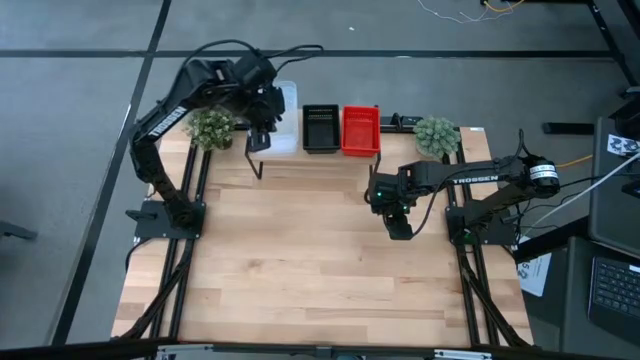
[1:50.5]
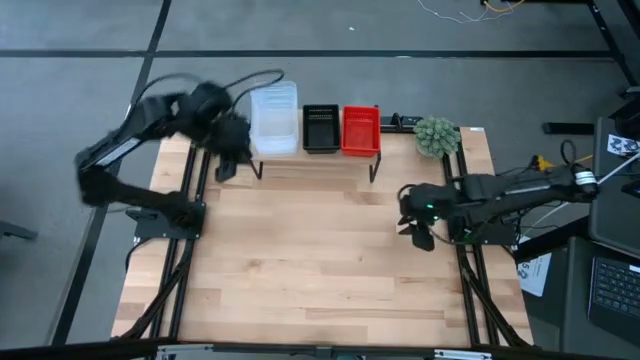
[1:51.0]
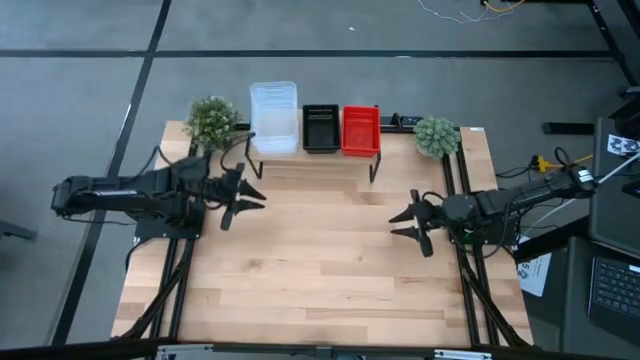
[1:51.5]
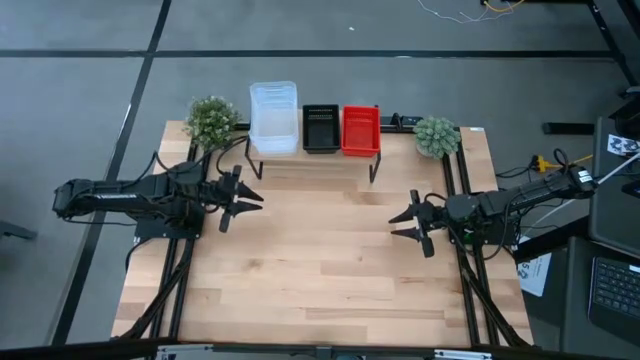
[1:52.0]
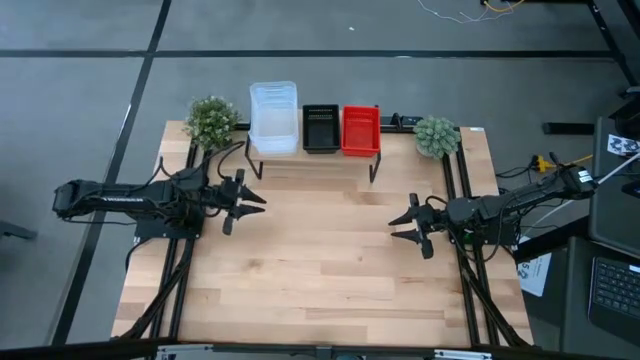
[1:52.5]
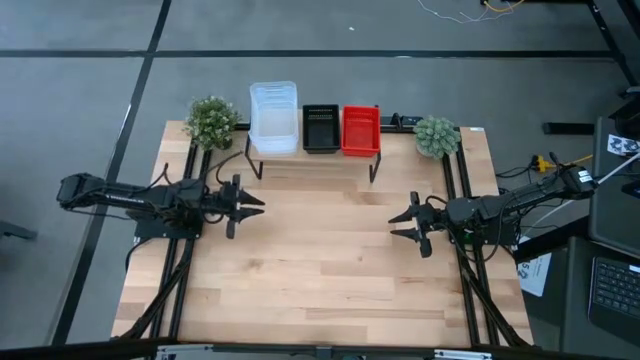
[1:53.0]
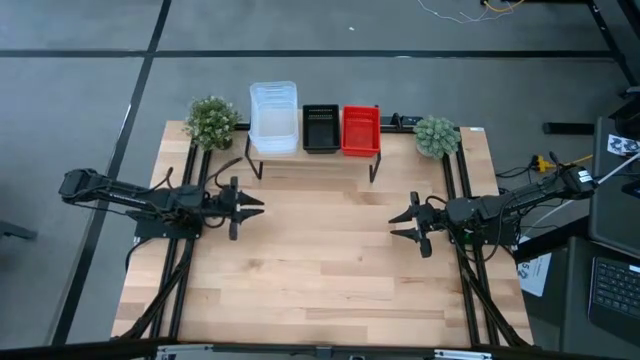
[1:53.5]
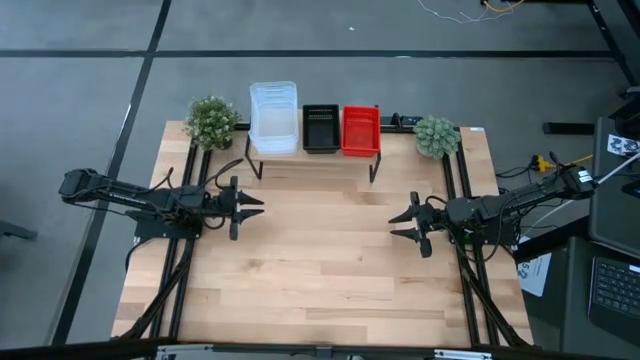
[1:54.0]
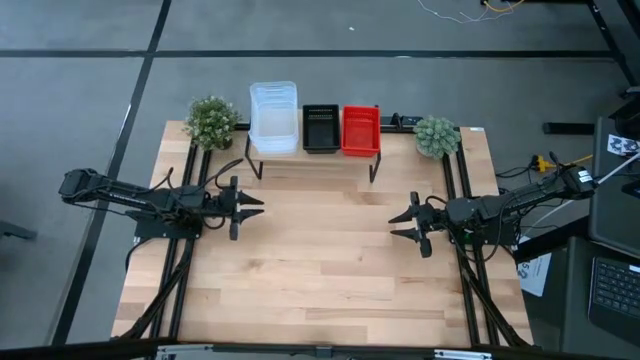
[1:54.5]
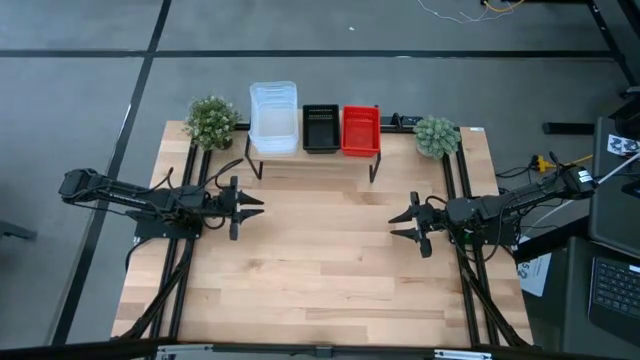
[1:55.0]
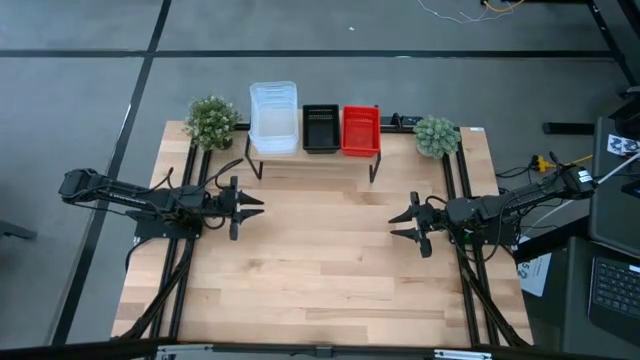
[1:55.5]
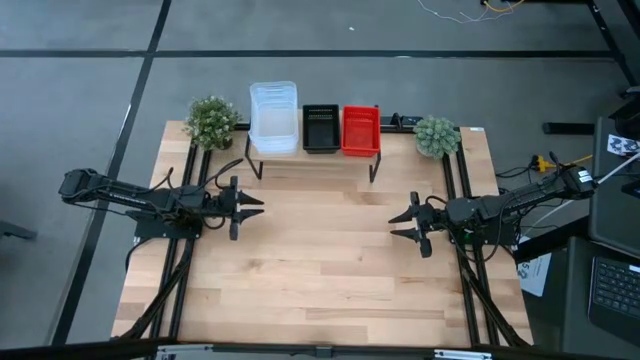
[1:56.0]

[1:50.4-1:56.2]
Task: Stack baskets on shelf by color
Return to Home Position

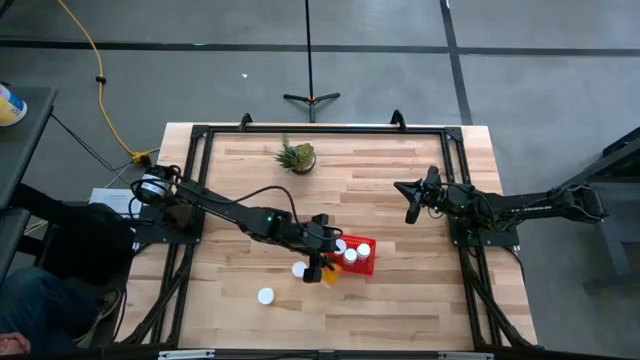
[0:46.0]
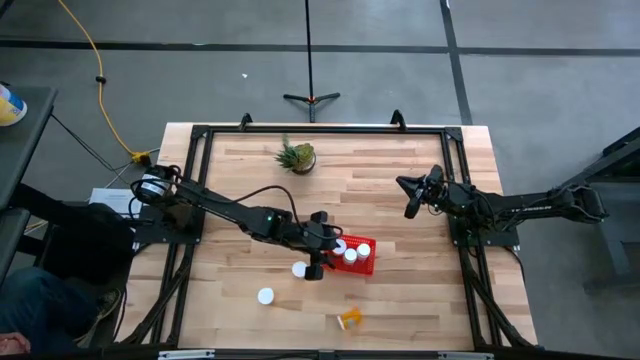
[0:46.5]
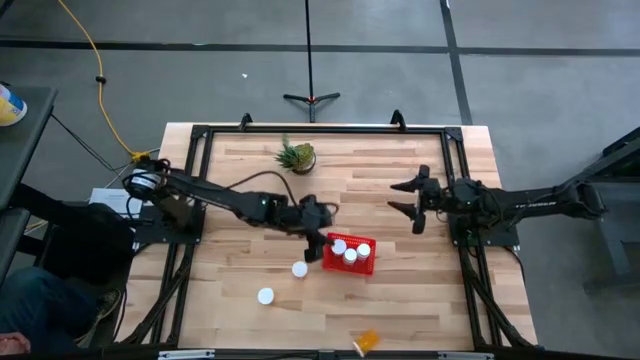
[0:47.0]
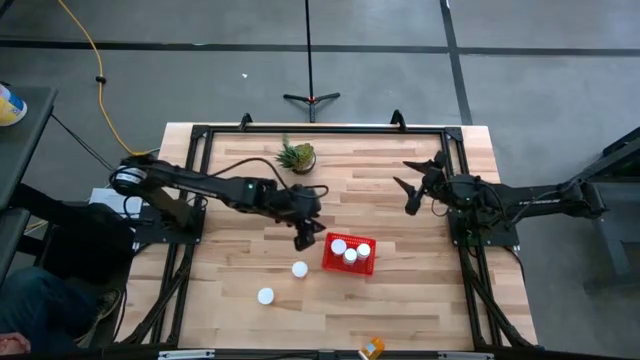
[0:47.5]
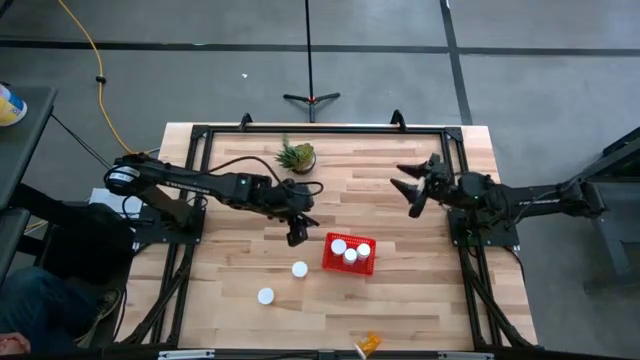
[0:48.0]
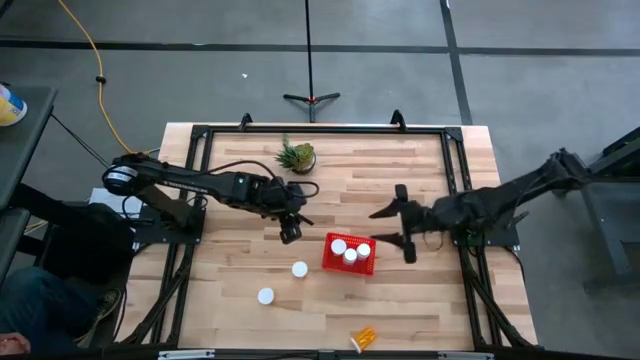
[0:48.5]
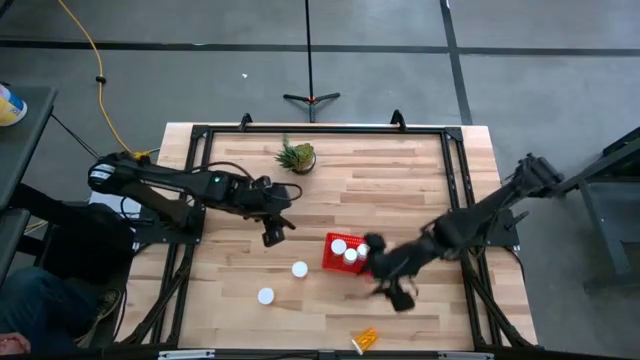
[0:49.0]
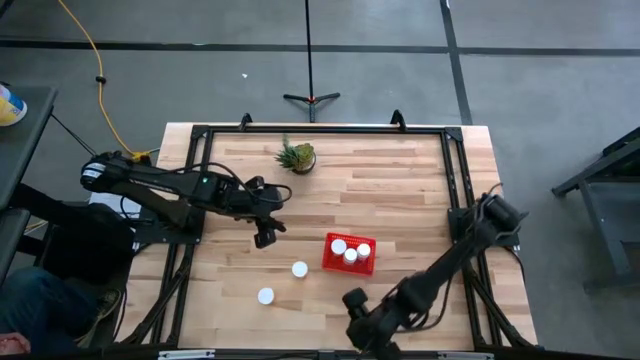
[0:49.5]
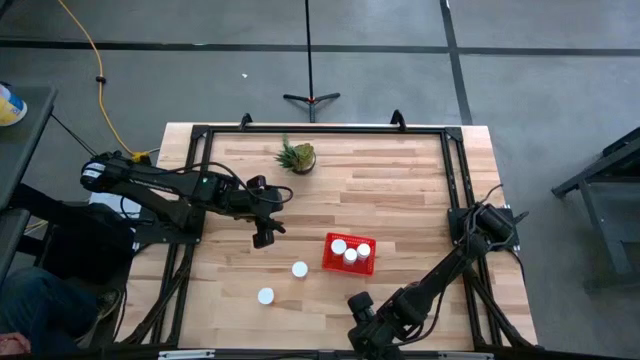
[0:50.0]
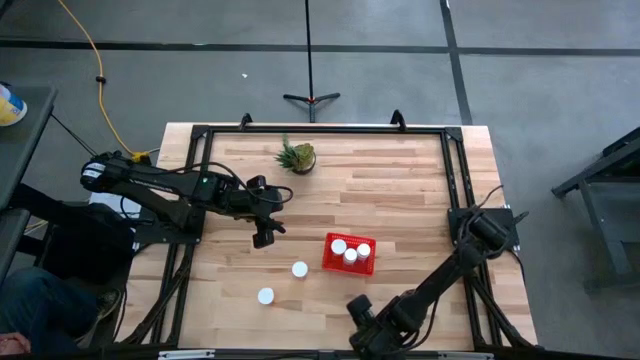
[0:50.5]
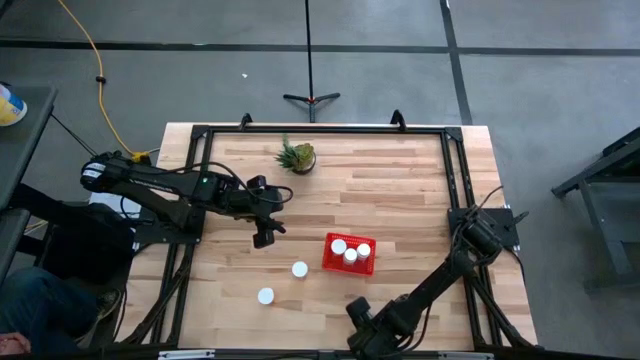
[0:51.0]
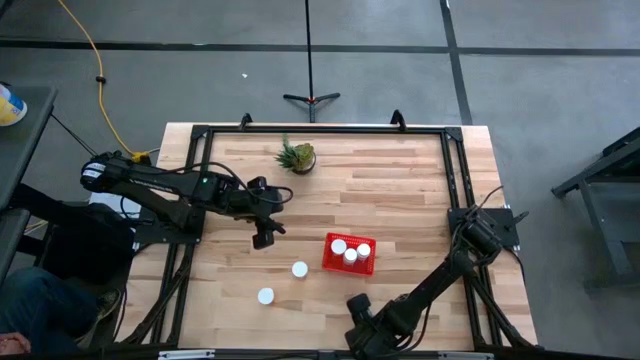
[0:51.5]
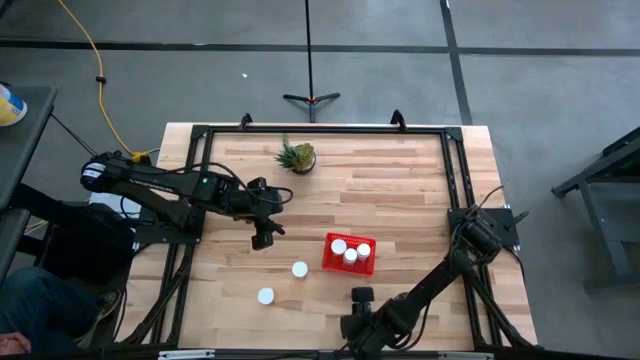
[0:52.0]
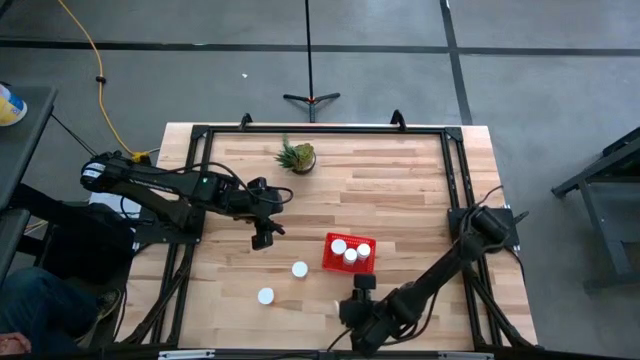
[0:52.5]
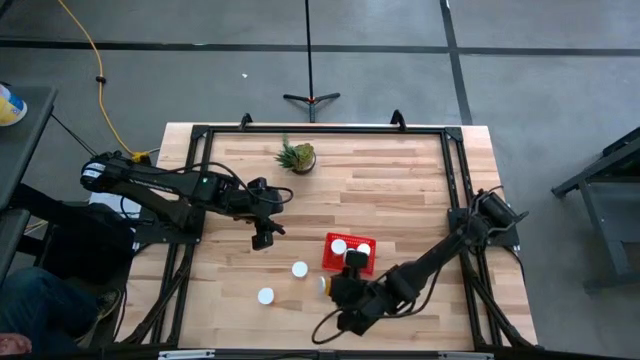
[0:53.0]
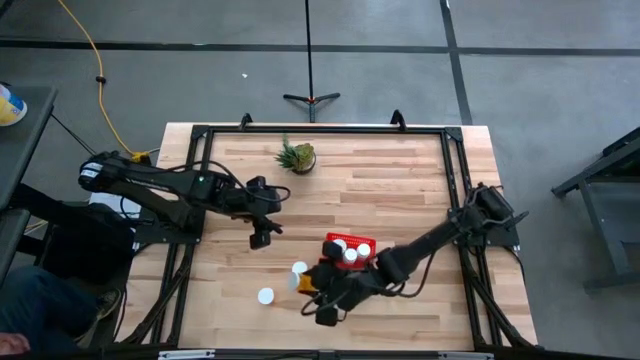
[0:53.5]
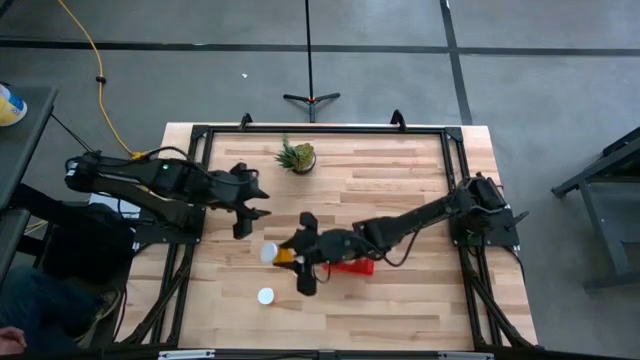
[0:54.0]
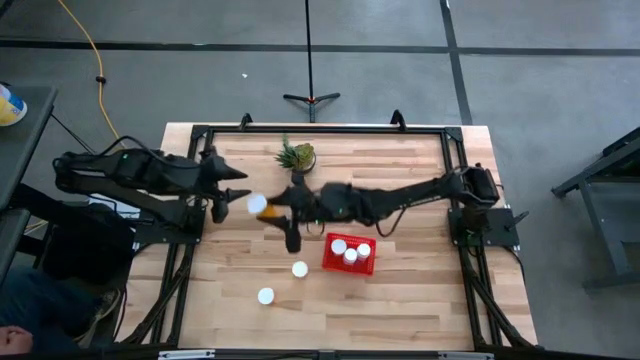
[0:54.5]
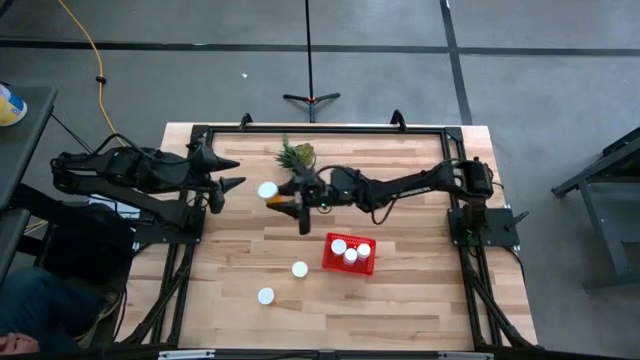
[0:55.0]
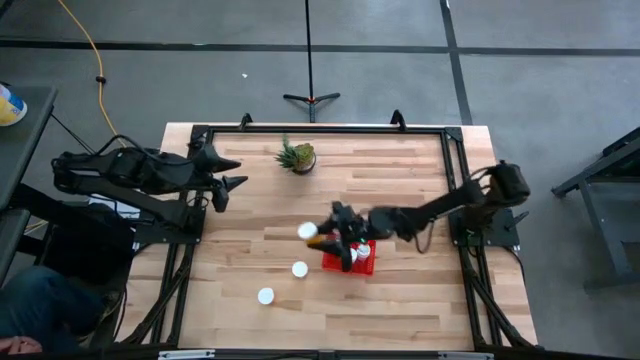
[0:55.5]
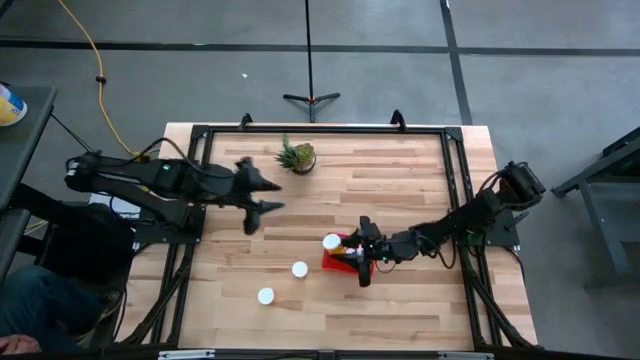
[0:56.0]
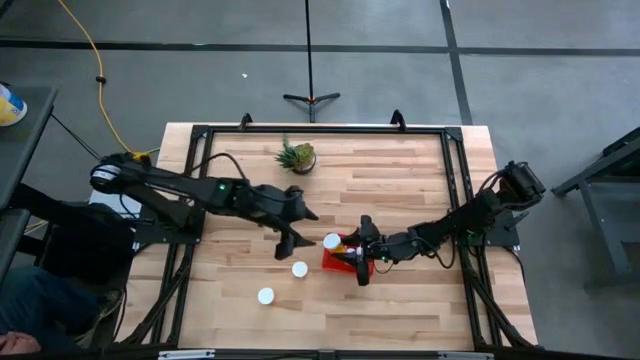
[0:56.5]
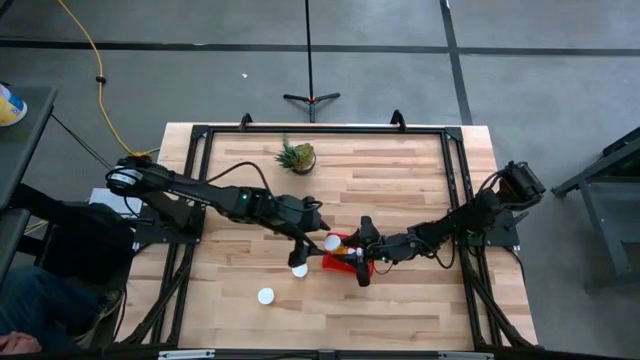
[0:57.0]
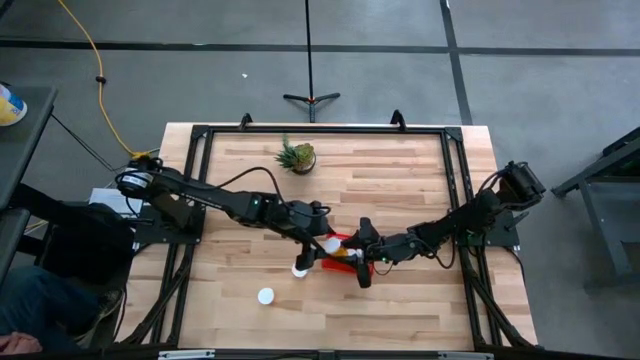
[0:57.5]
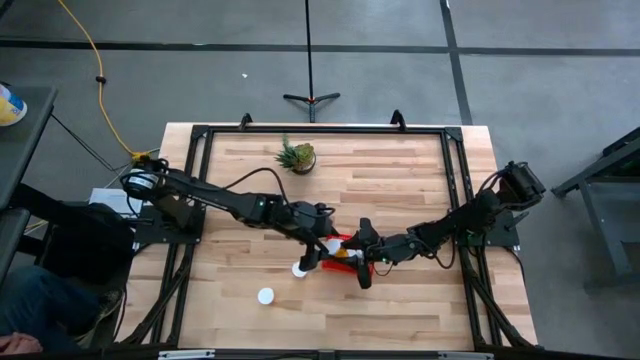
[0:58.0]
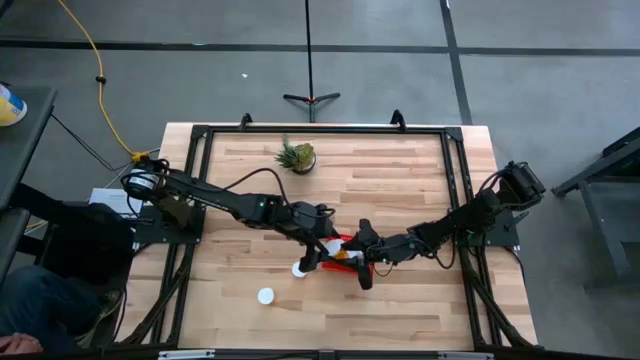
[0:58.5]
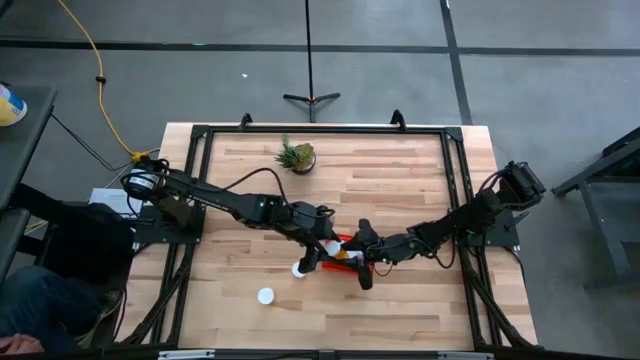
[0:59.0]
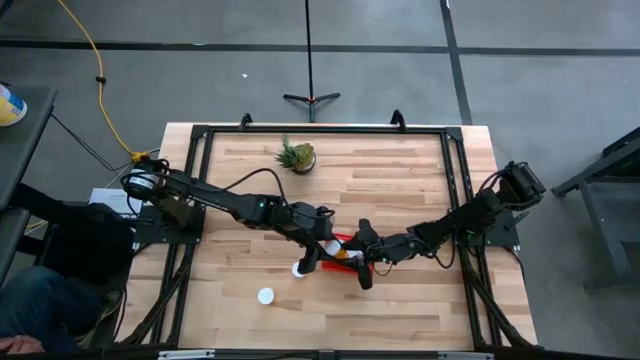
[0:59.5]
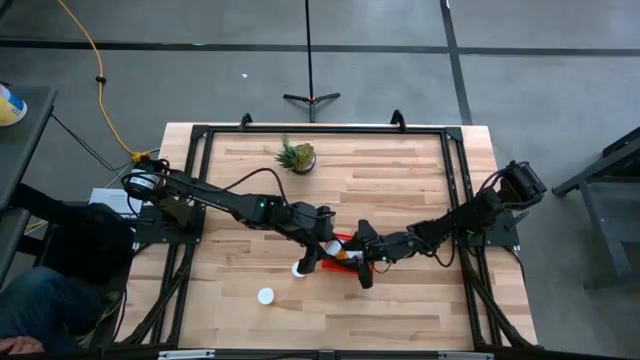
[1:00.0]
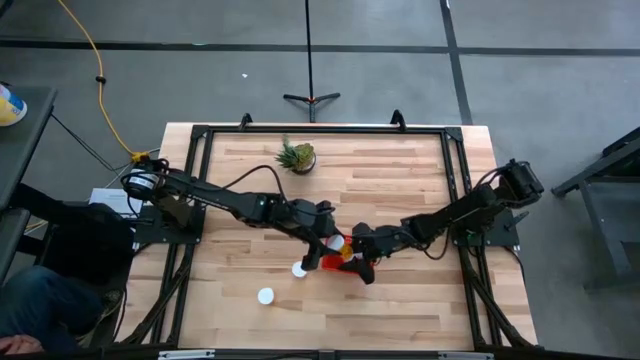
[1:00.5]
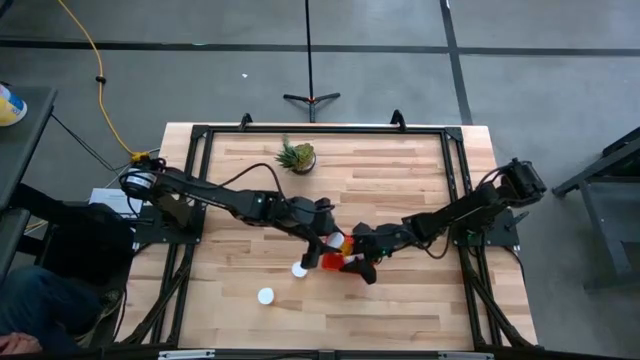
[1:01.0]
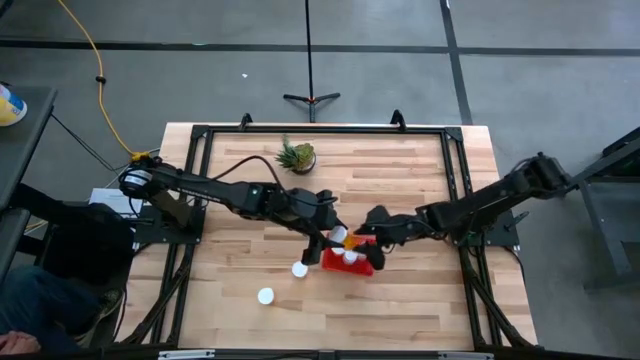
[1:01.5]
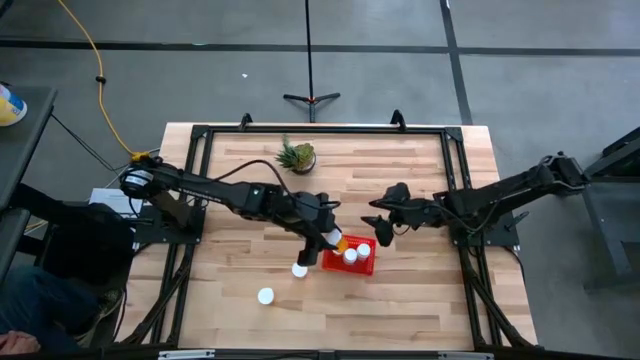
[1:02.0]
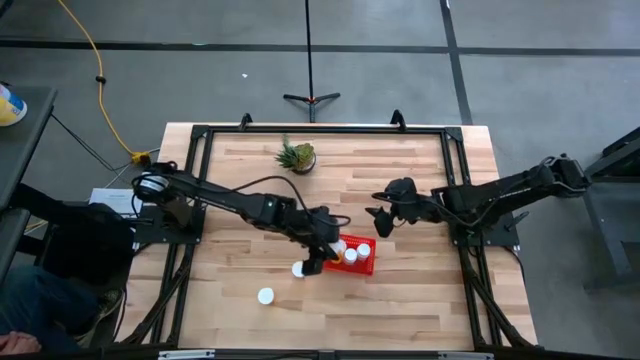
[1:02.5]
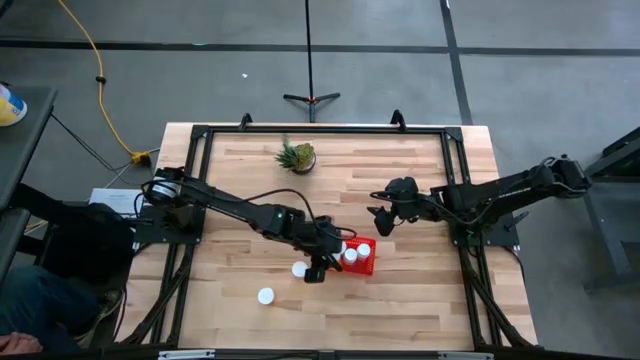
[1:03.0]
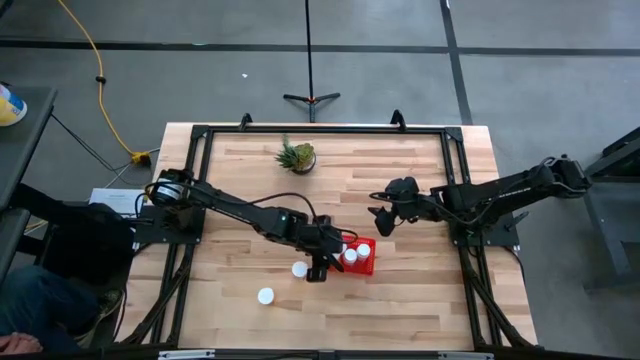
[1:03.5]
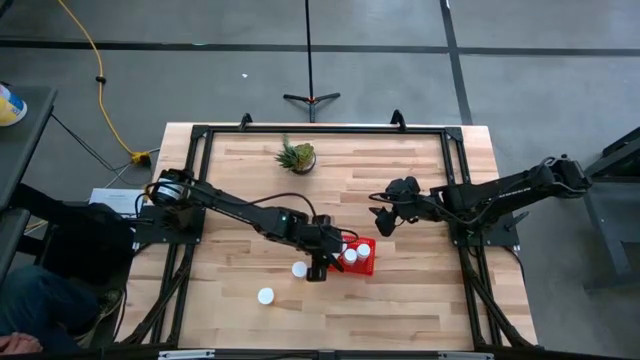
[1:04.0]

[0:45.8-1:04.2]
Task: Pick and place pill bottles into a basket
Put the orange pill bottle into the red bin
